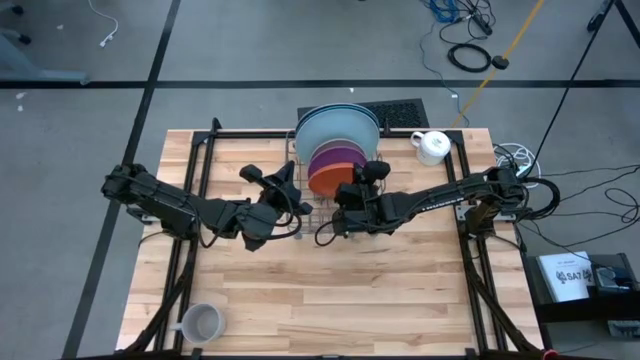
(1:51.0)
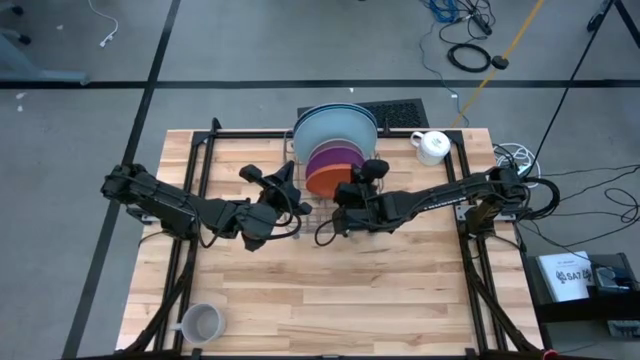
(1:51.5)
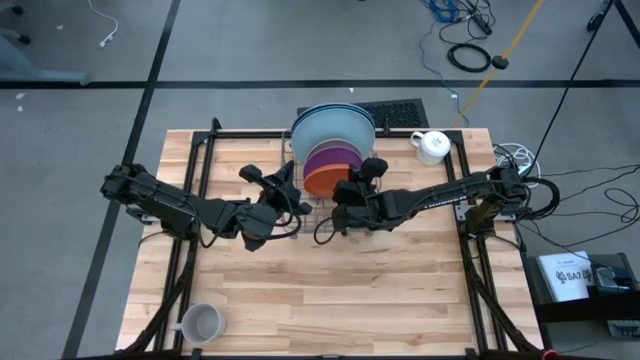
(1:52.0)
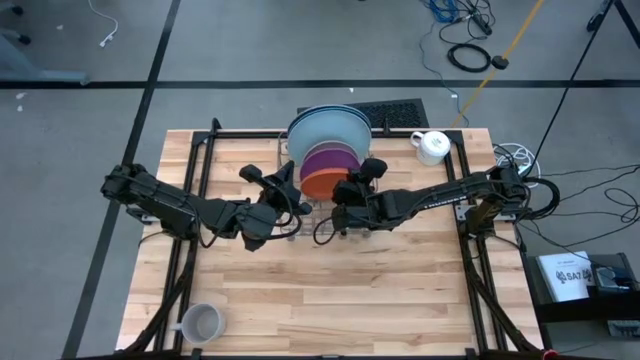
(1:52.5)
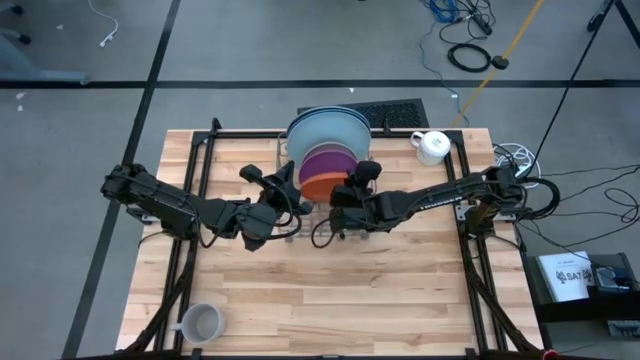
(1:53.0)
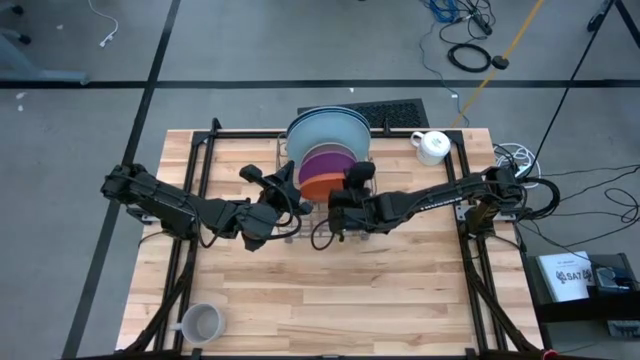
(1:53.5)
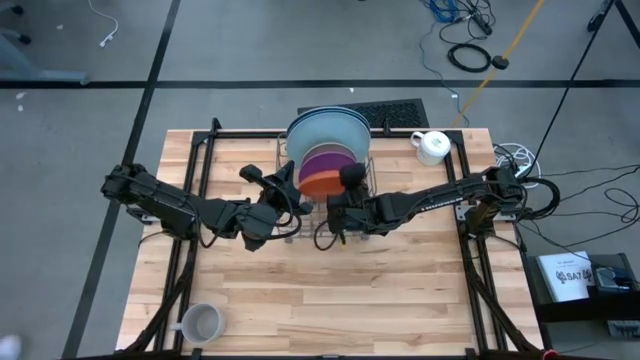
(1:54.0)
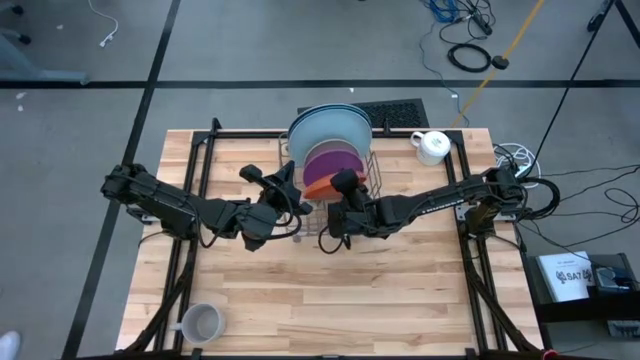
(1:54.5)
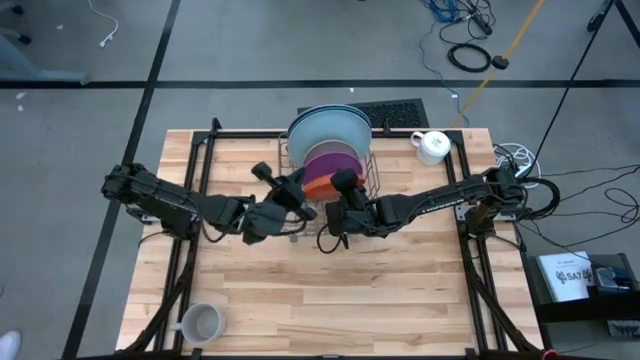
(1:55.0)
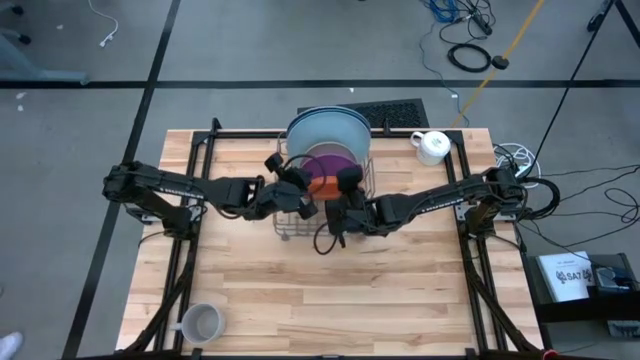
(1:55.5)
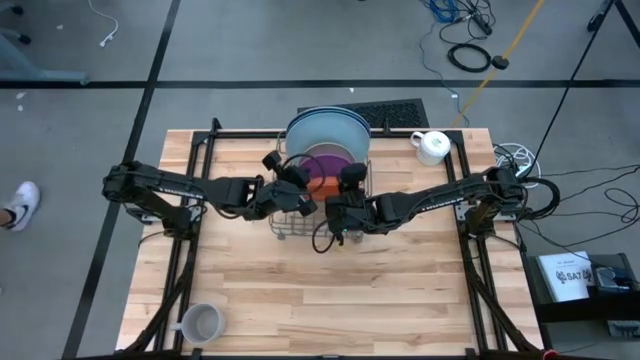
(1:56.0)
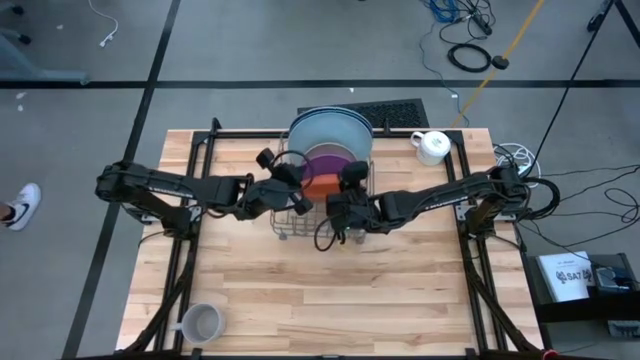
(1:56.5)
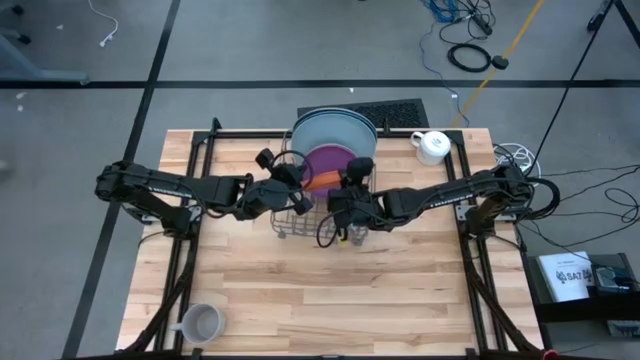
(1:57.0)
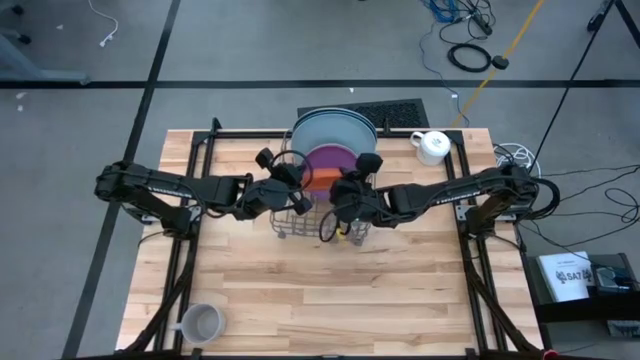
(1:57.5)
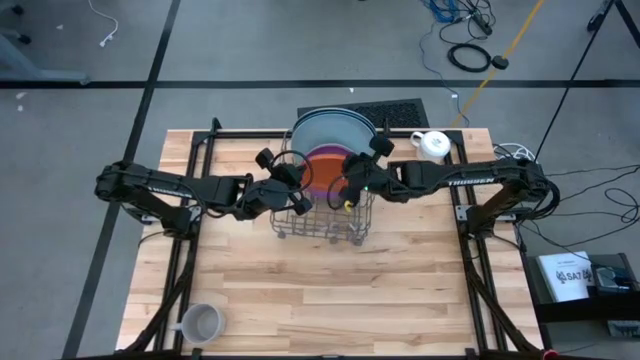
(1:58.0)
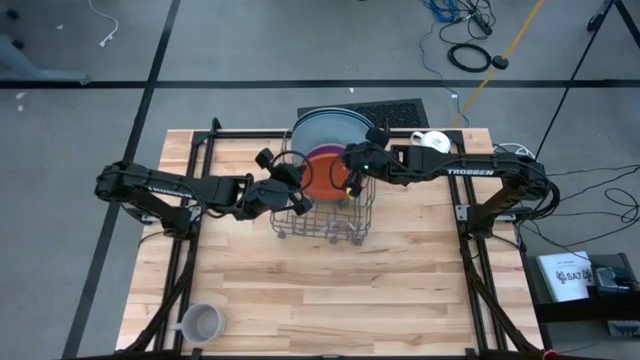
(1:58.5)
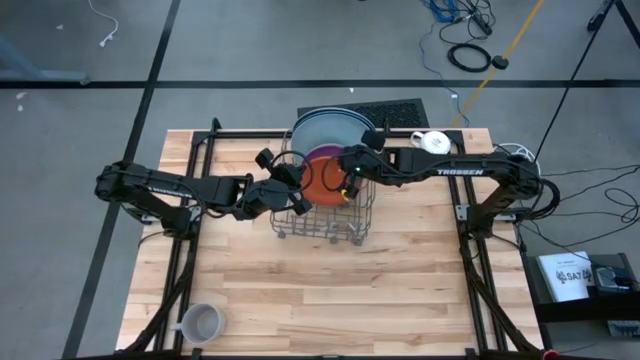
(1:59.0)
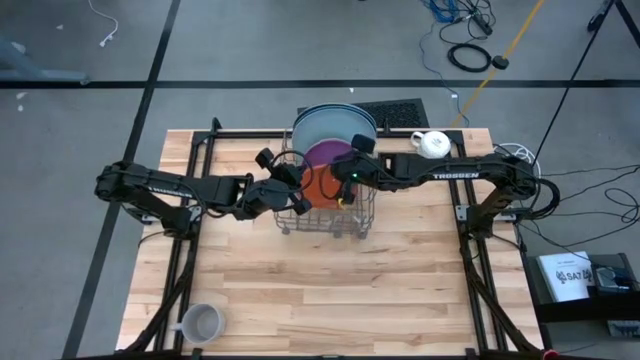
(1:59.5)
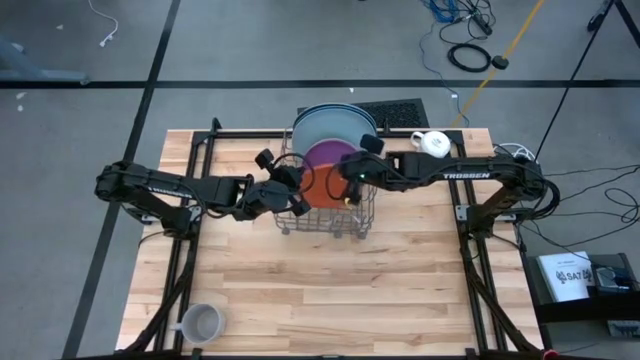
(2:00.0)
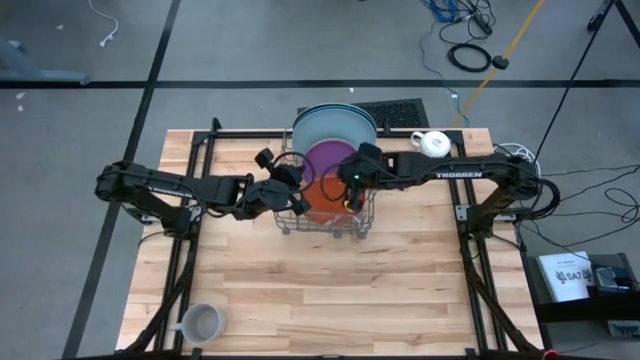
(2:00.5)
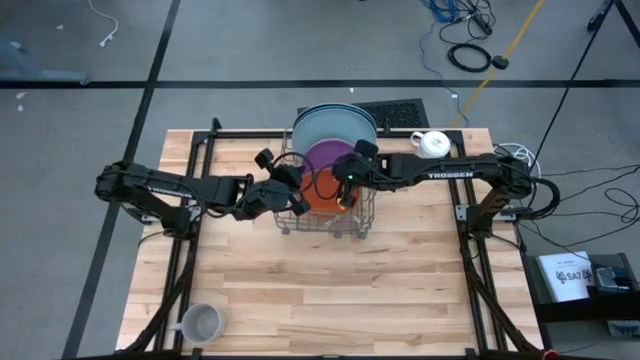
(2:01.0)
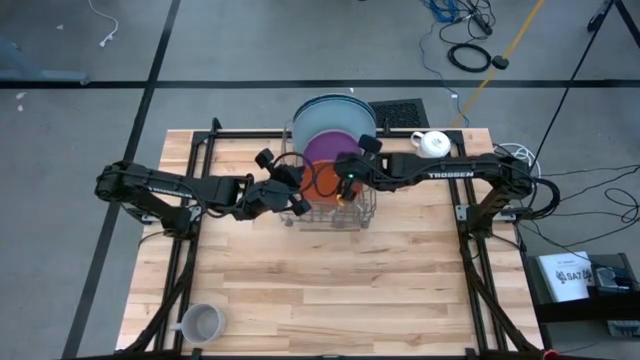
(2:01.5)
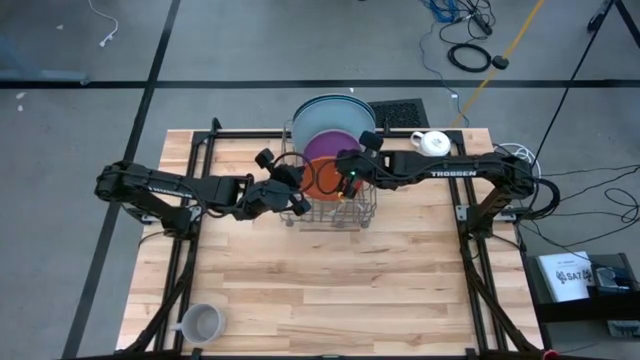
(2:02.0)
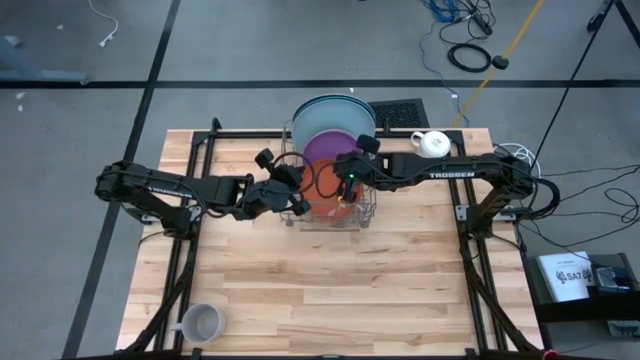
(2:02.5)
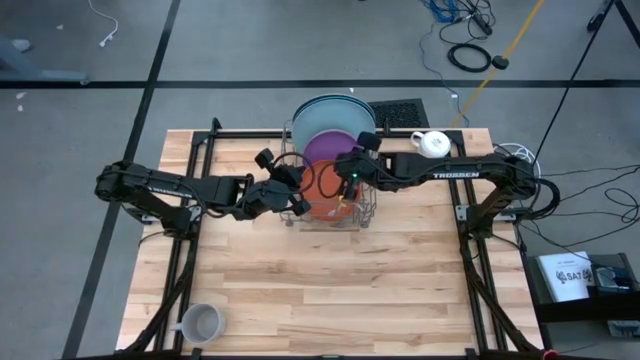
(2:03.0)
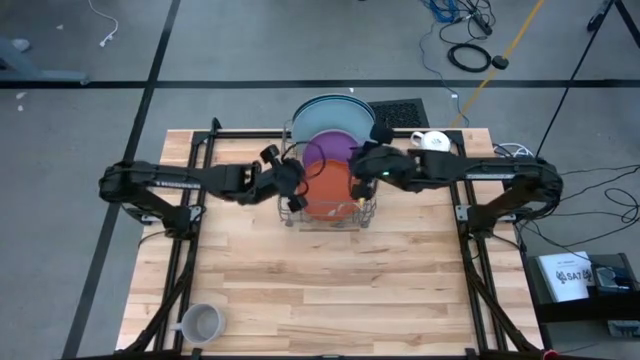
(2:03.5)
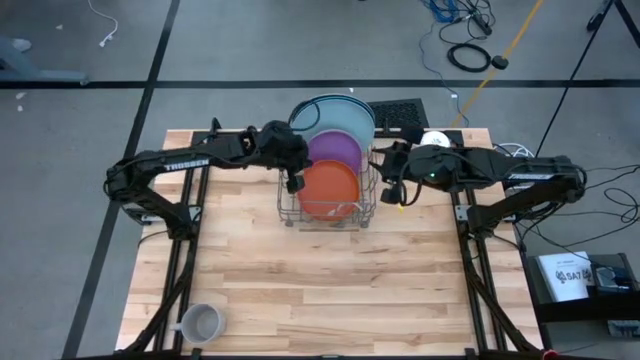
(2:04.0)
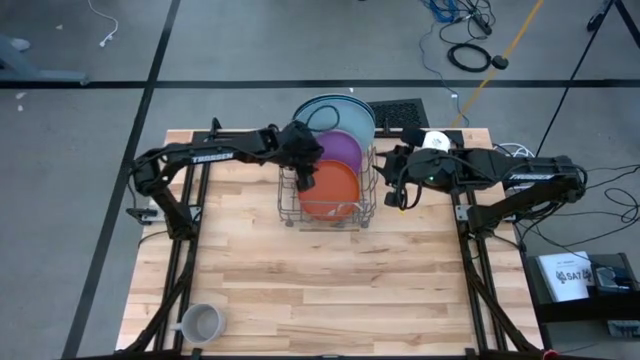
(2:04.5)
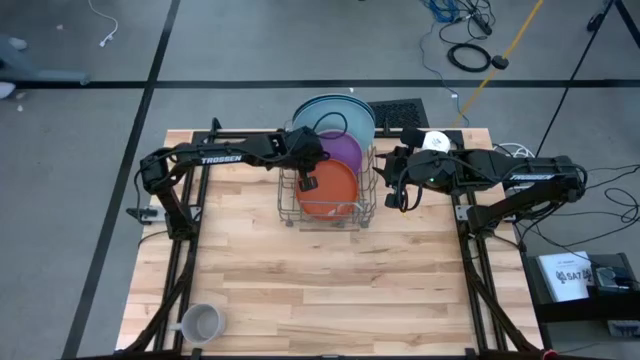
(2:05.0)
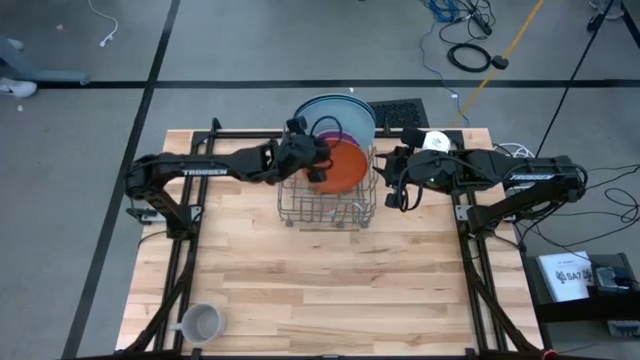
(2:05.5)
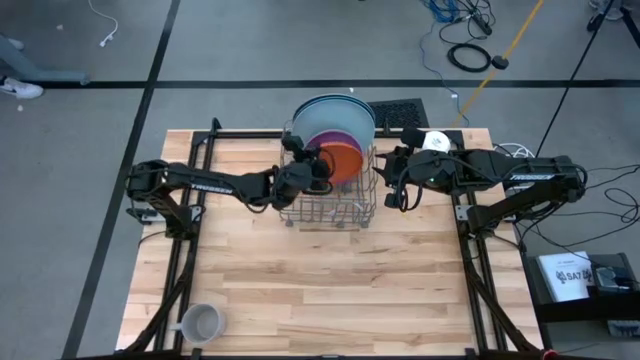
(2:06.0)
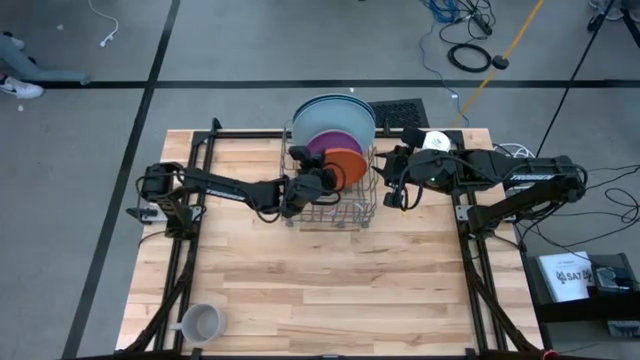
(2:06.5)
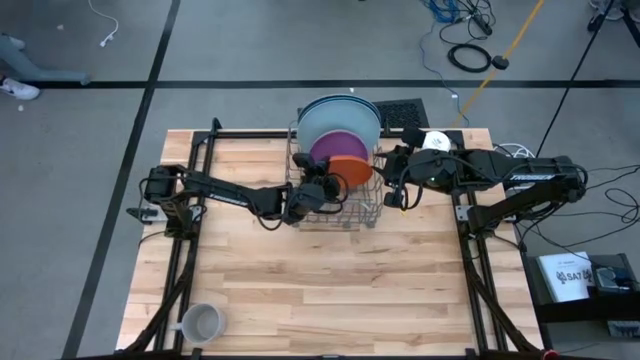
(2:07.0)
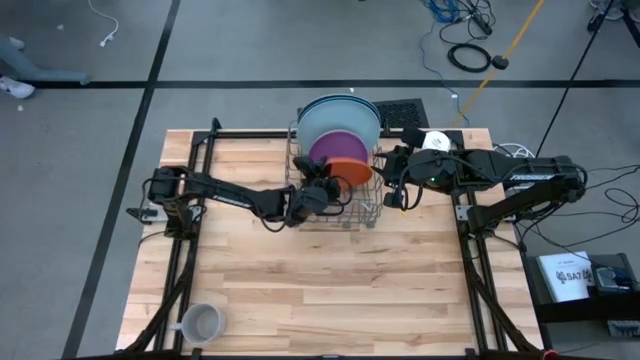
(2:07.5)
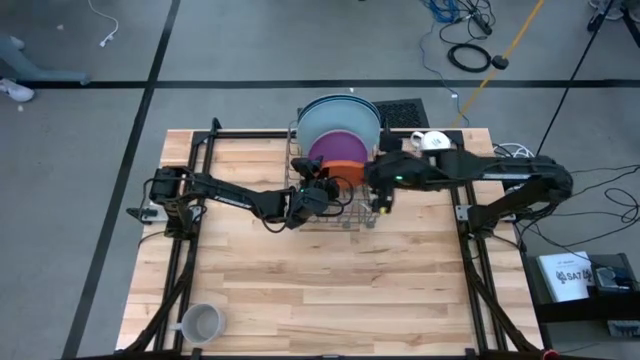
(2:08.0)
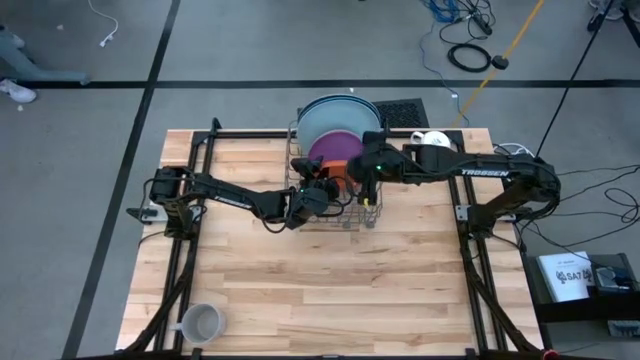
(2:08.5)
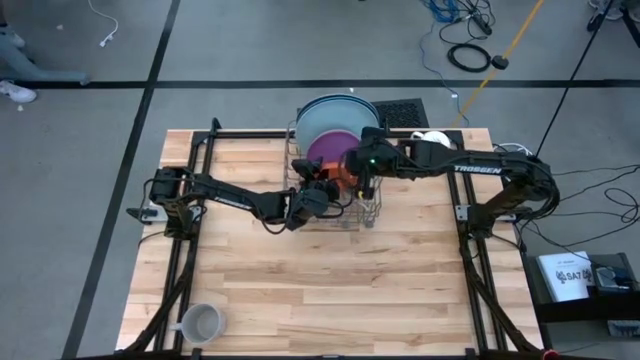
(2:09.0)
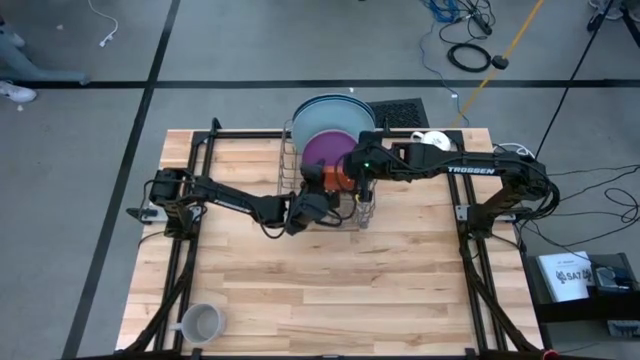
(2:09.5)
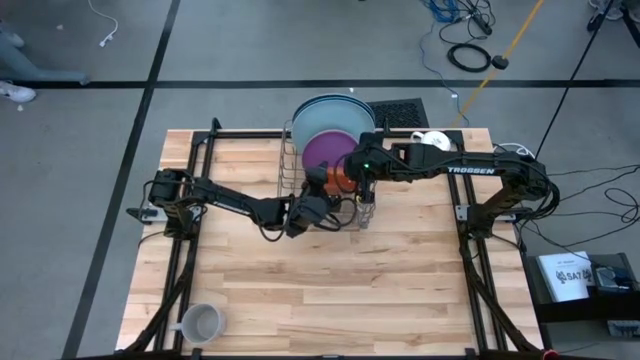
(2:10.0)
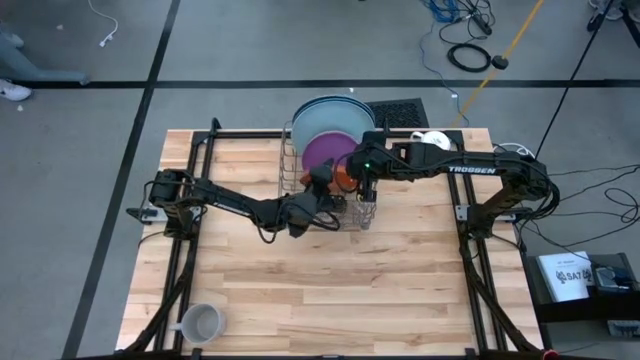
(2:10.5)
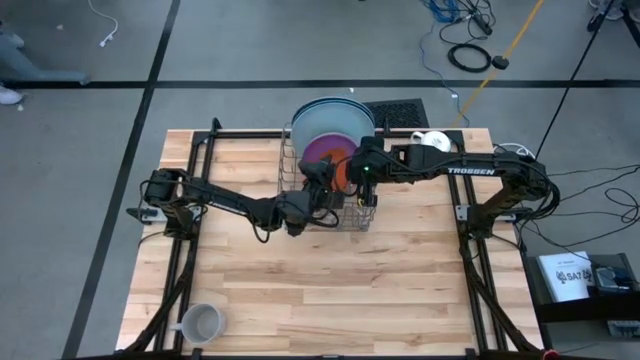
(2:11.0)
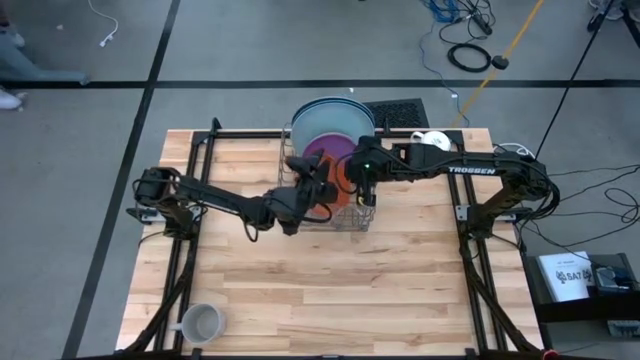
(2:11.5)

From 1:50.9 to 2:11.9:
Task: Sort dishes
Put the orange plate into the dish rack
